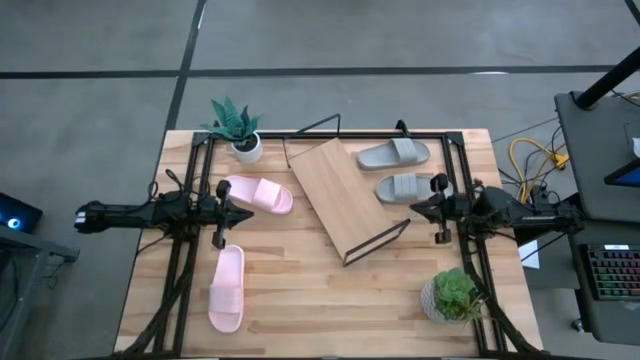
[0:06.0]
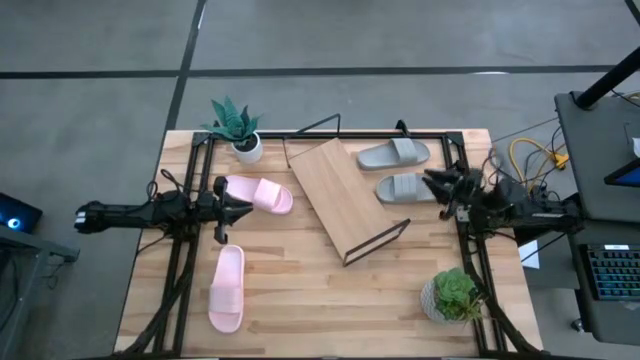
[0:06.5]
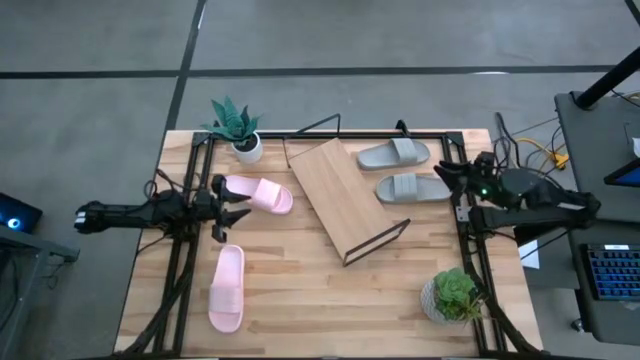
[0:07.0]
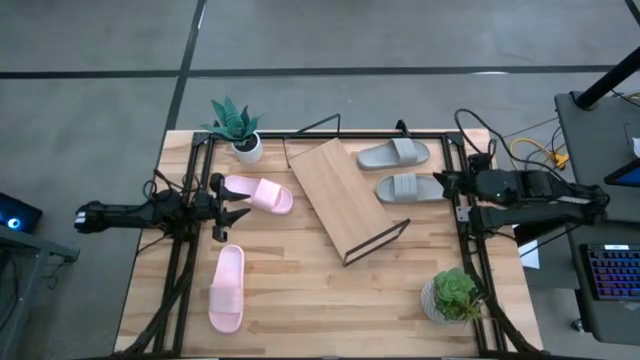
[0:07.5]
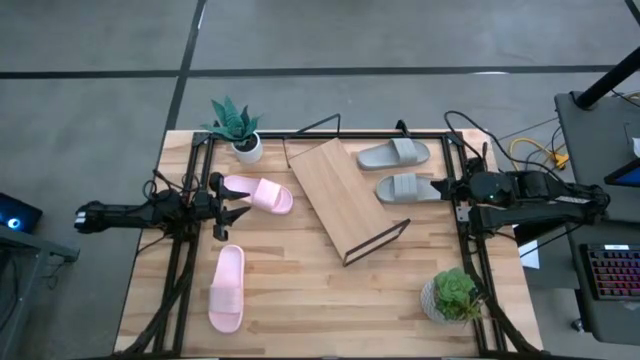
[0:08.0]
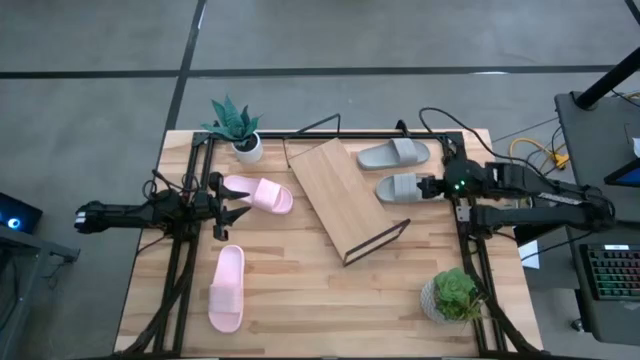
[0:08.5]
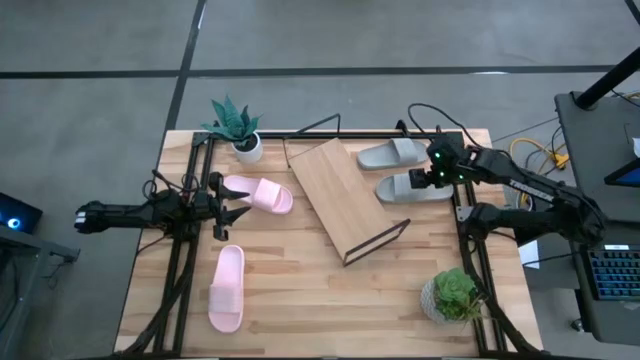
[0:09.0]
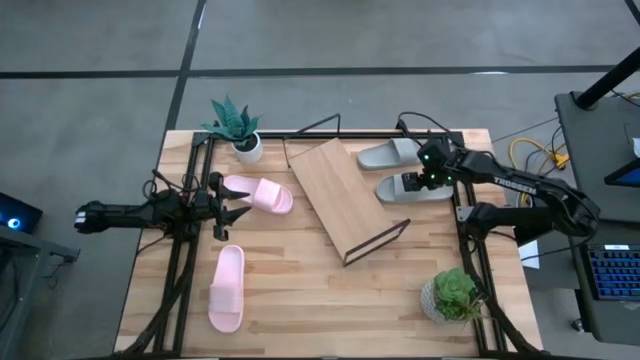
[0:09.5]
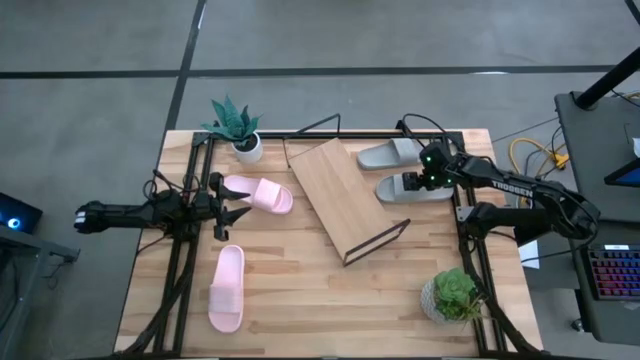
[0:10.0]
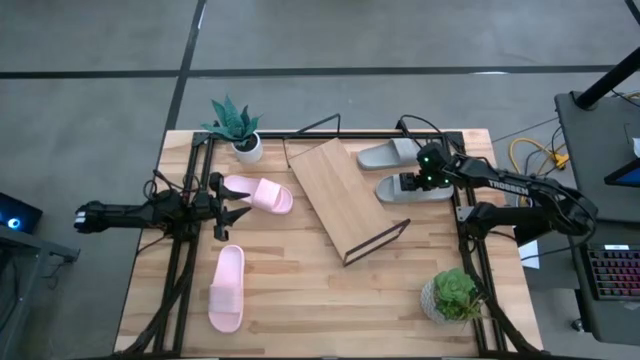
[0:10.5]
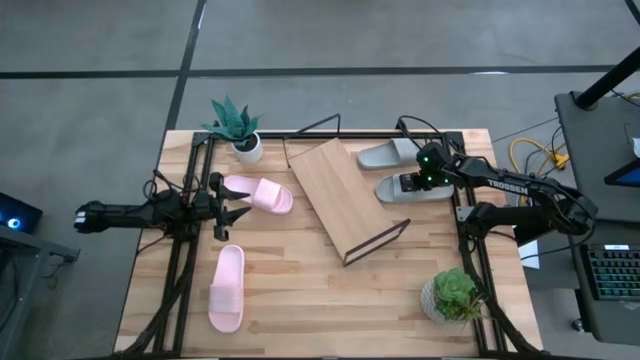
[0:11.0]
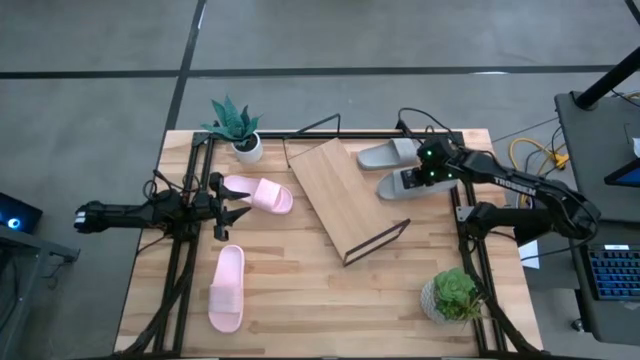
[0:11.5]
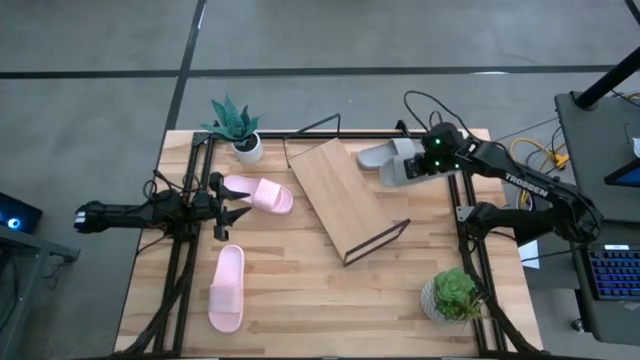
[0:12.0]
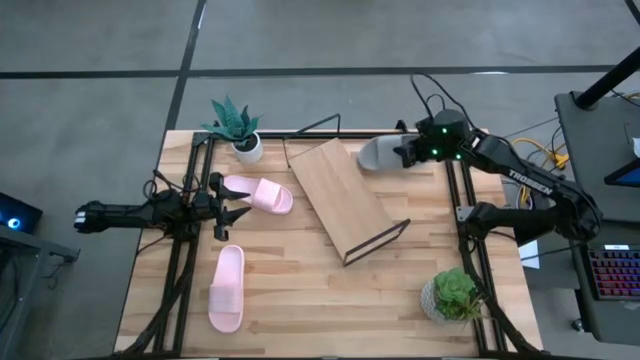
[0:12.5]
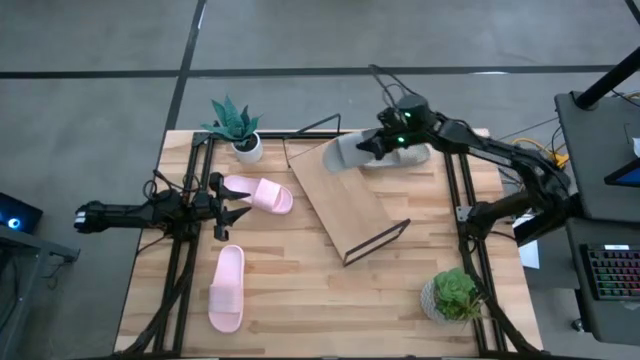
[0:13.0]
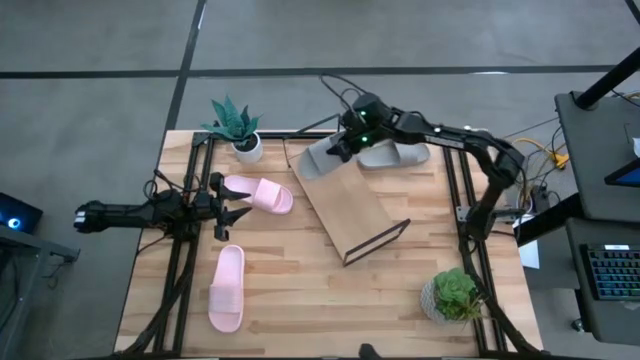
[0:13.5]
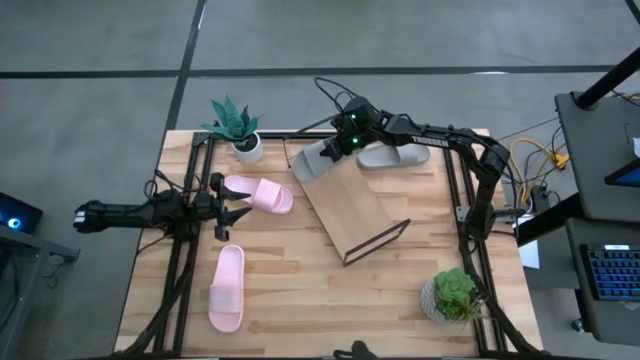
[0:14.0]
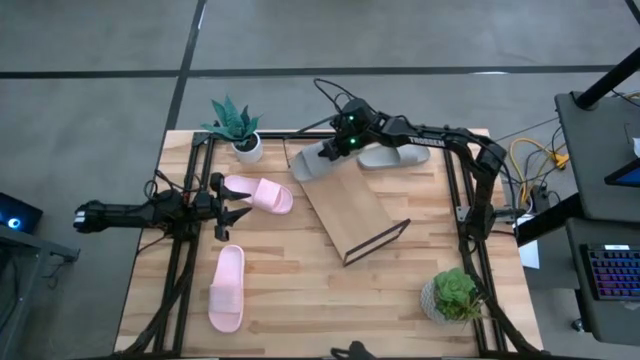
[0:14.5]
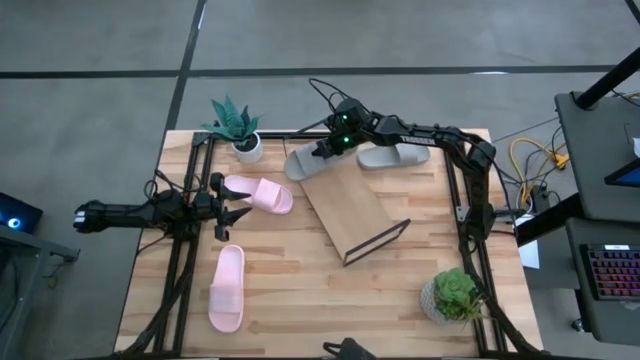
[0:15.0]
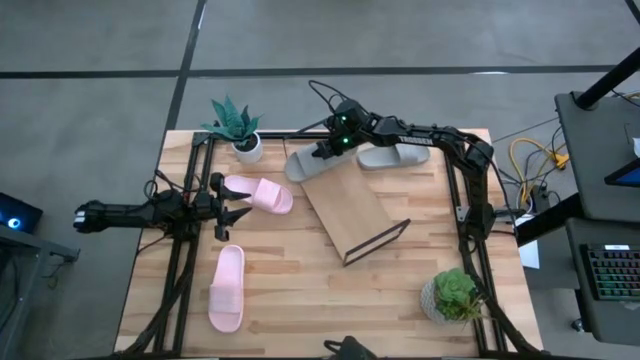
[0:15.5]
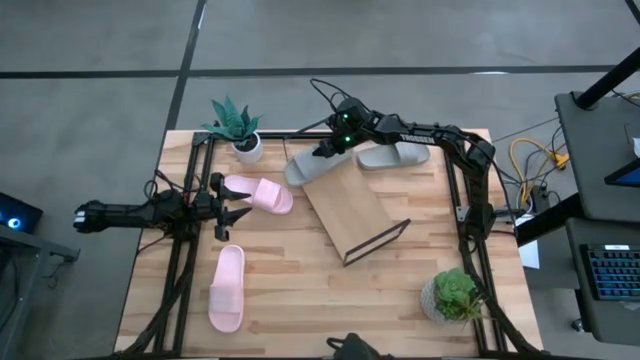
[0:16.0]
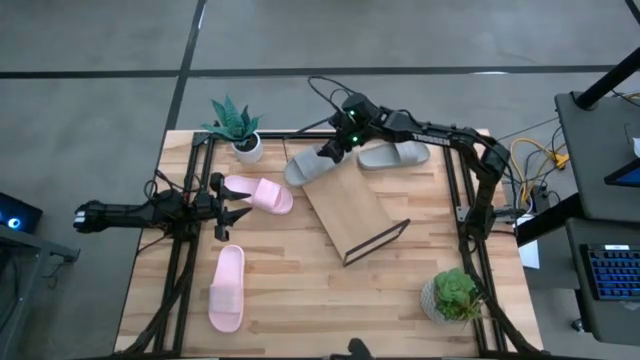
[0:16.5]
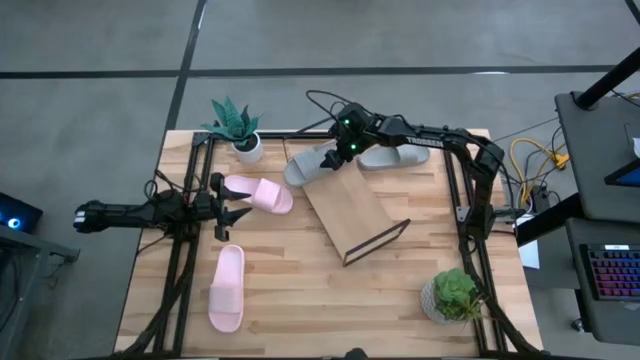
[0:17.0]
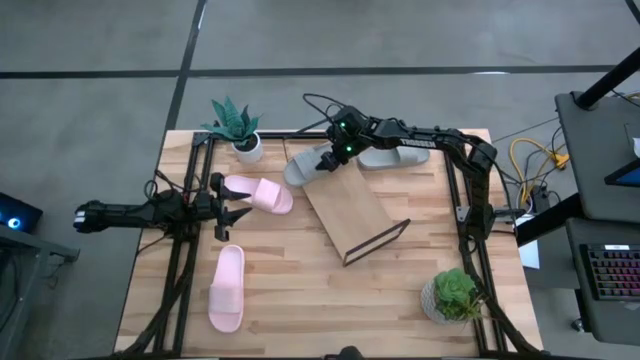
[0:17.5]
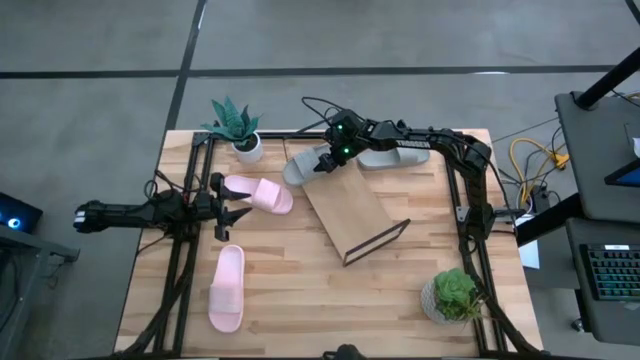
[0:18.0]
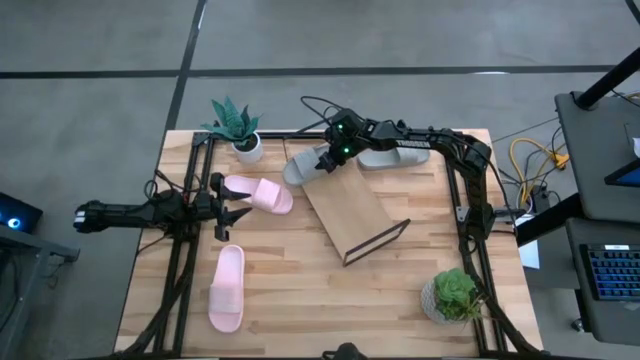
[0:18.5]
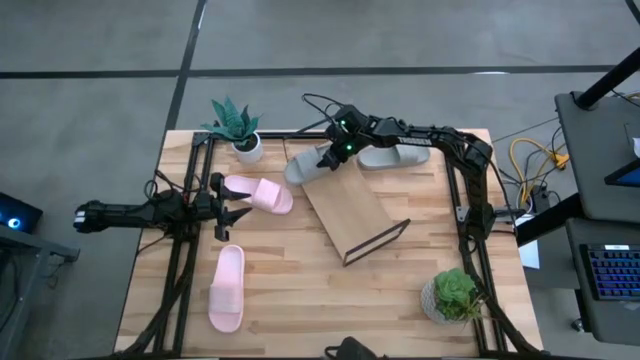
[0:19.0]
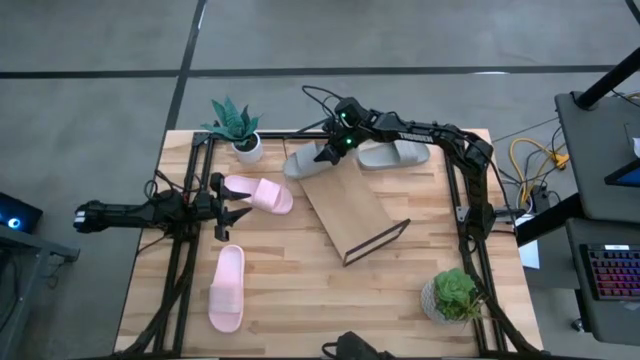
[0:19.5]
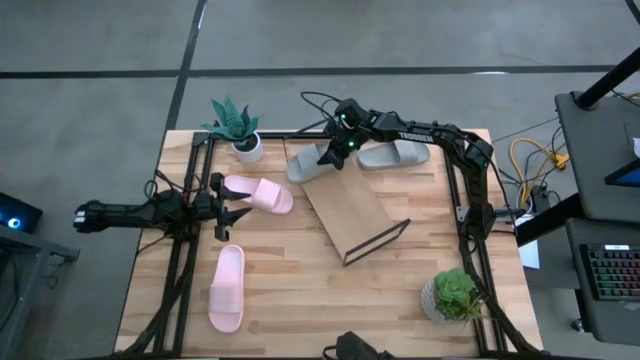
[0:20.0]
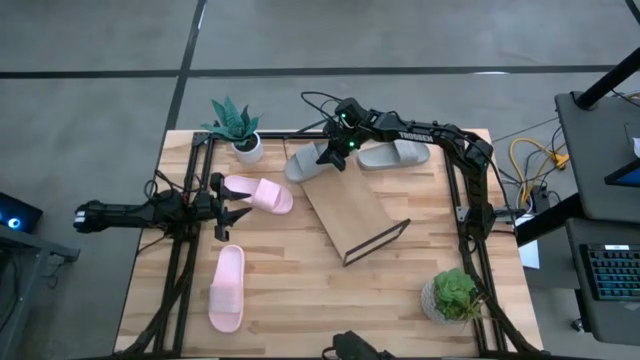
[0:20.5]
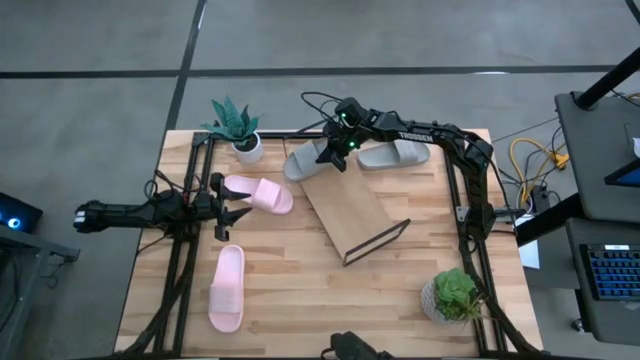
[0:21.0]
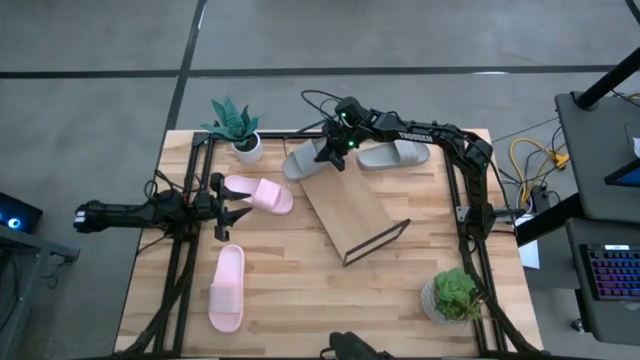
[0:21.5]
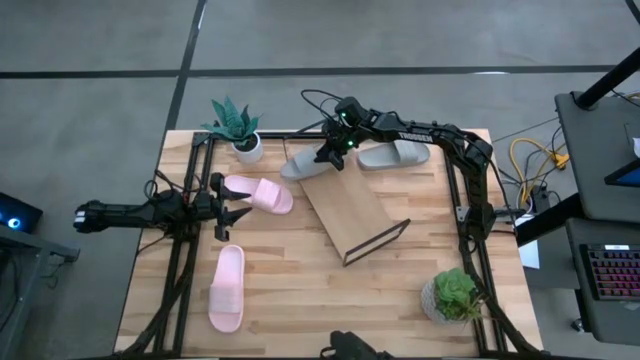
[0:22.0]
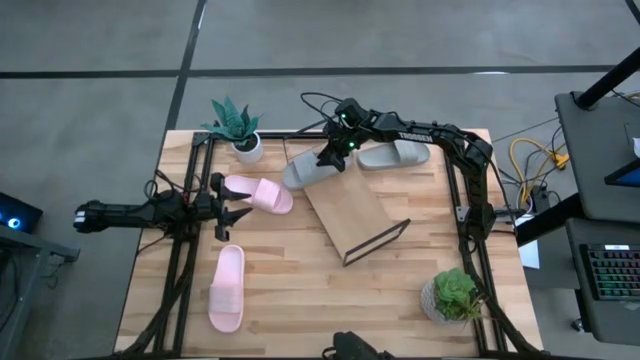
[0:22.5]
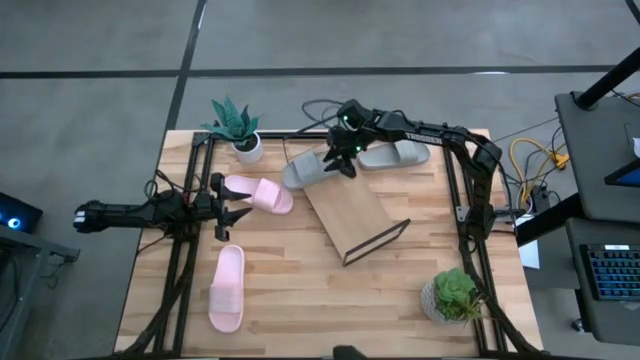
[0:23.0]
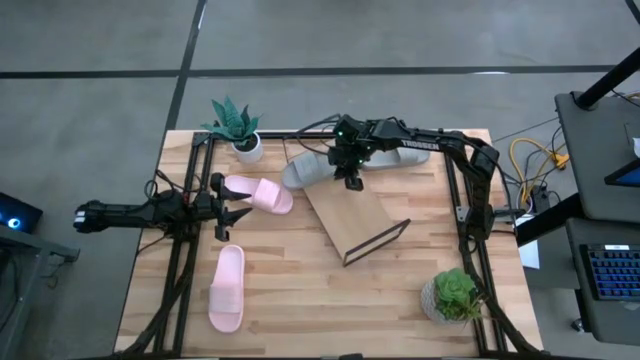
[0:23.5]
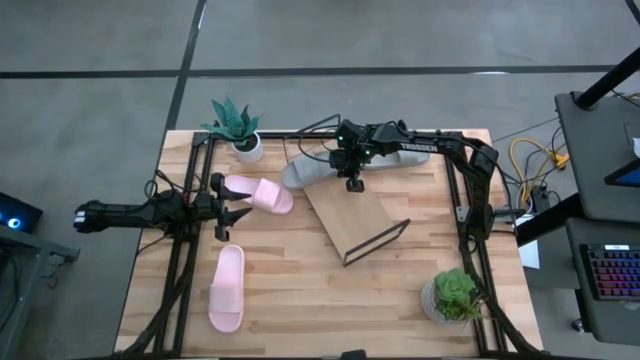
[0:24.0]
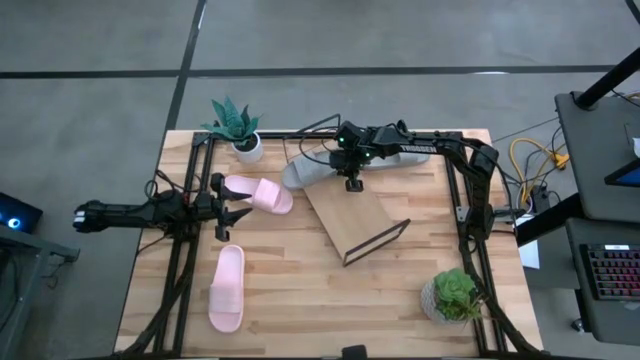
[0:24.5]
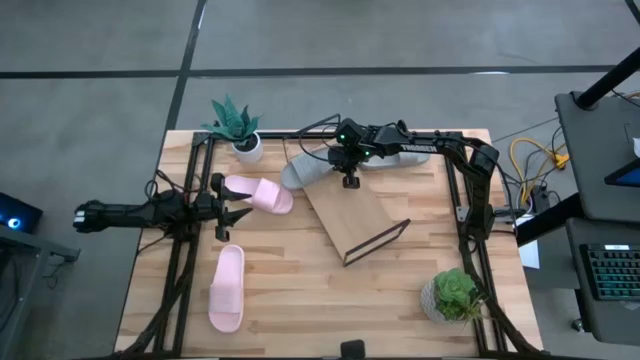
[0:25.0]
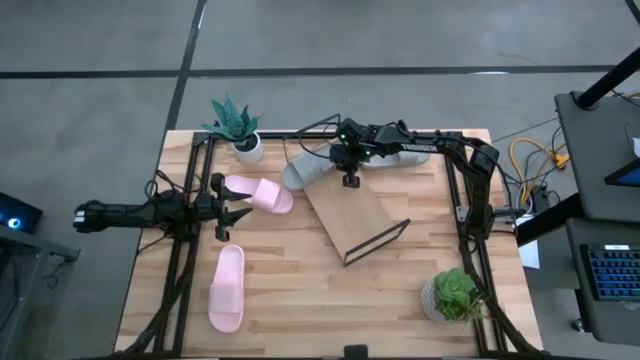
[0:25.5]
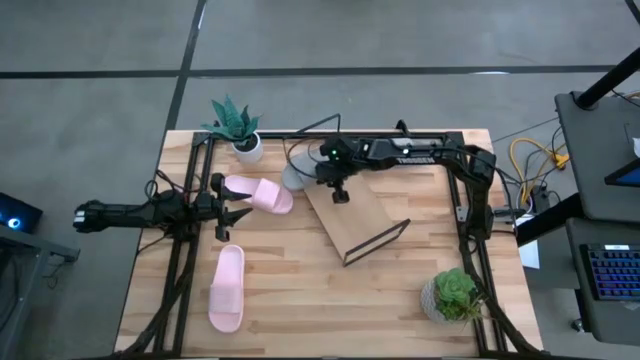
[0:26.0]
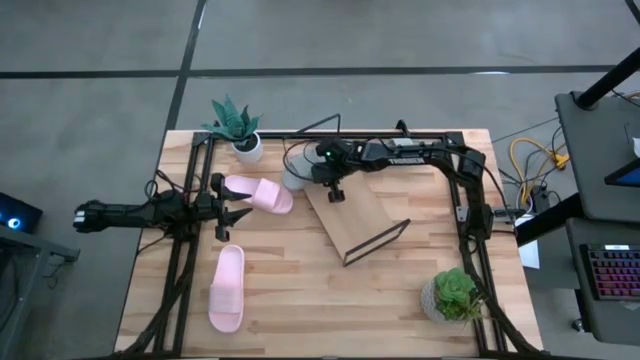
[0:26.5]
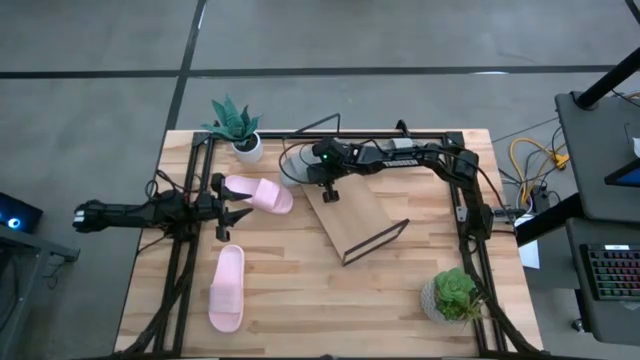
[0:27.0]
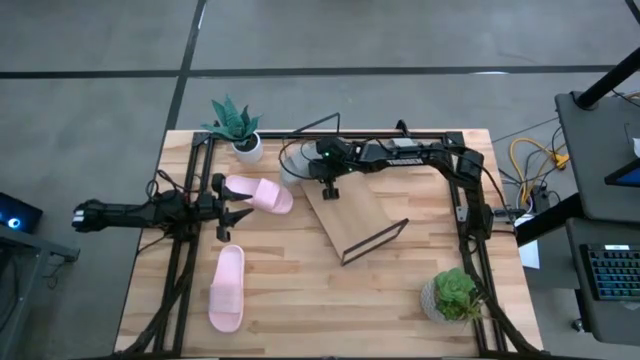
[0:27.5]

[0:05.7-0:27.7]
Task: Pick and place slides into the shelf
Put the bottom gray slide on the shelf
